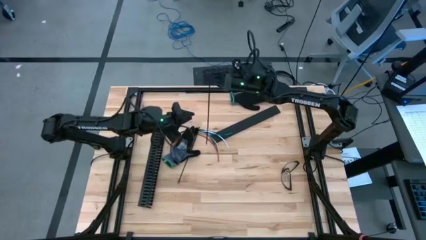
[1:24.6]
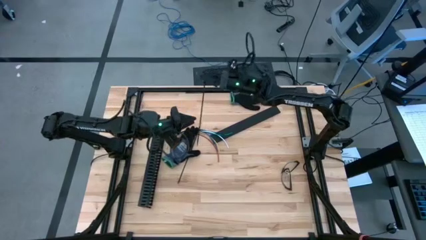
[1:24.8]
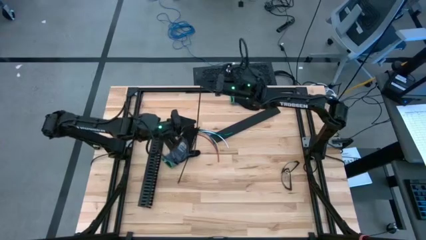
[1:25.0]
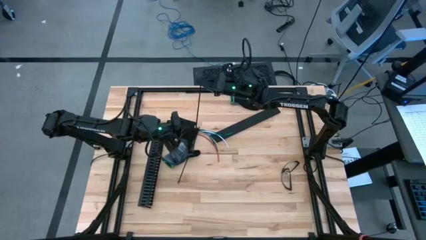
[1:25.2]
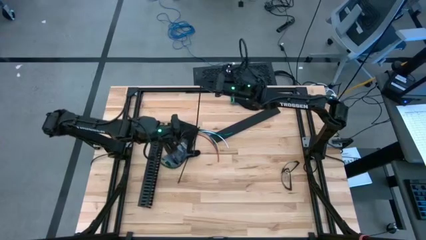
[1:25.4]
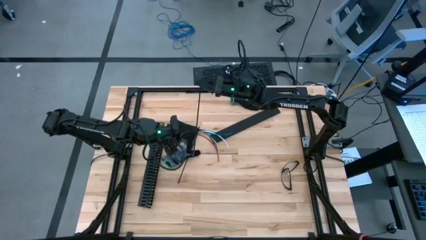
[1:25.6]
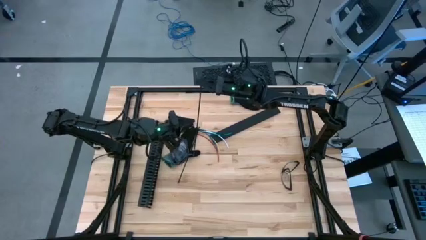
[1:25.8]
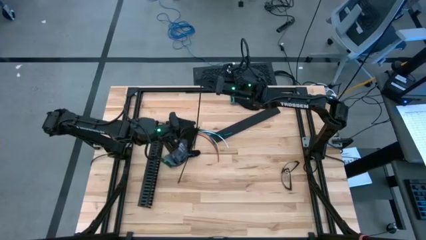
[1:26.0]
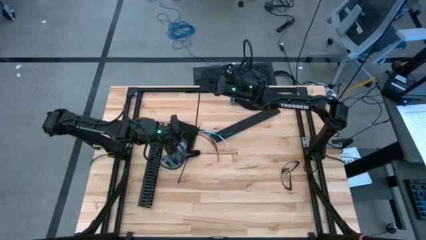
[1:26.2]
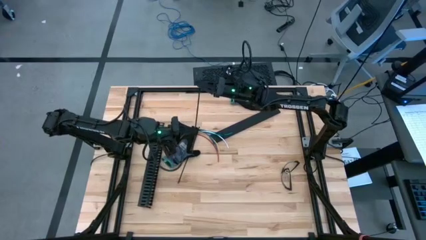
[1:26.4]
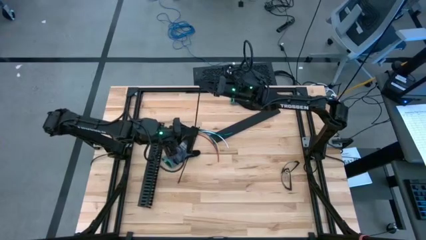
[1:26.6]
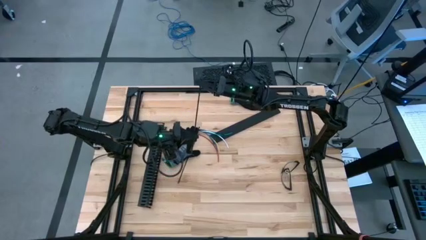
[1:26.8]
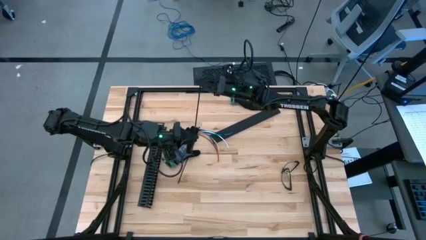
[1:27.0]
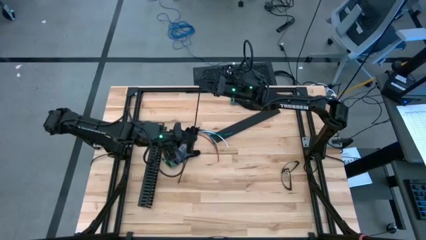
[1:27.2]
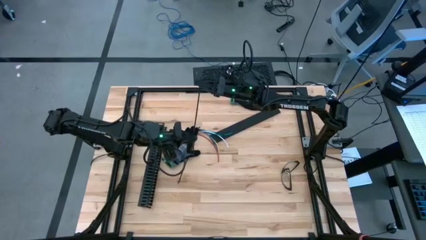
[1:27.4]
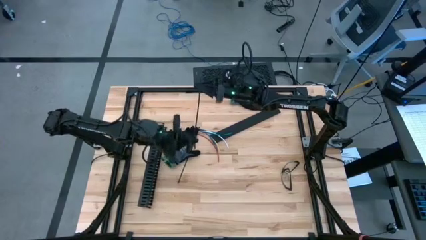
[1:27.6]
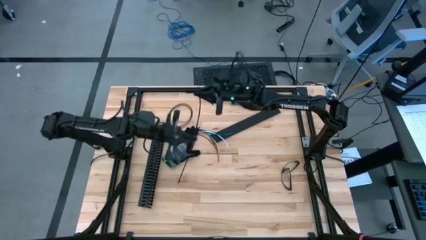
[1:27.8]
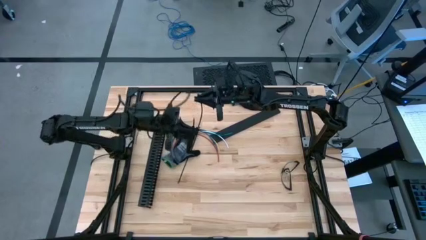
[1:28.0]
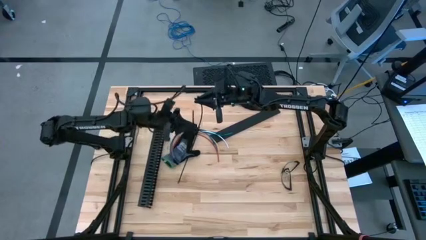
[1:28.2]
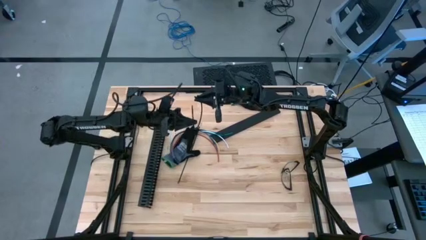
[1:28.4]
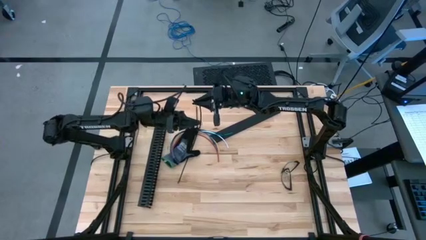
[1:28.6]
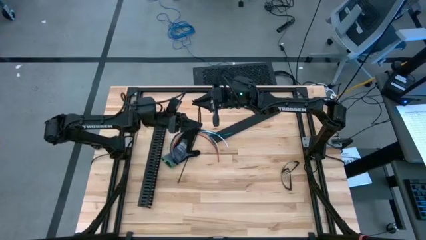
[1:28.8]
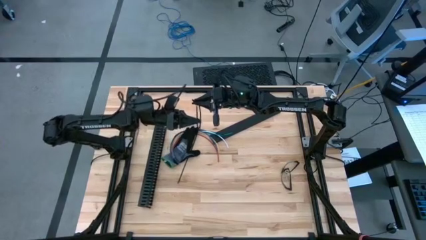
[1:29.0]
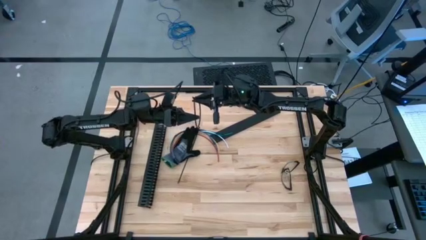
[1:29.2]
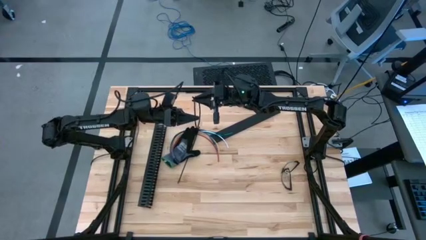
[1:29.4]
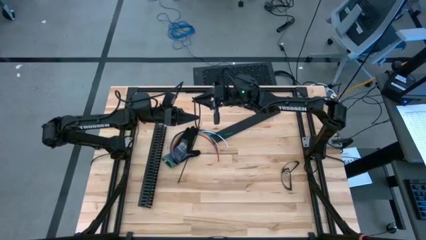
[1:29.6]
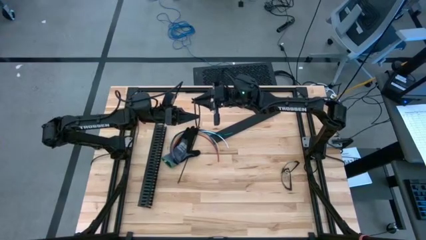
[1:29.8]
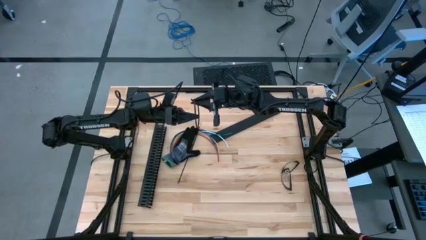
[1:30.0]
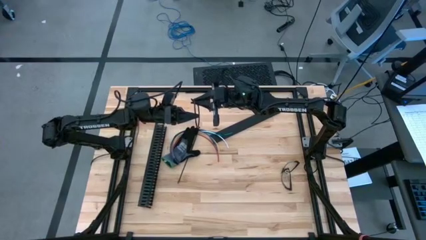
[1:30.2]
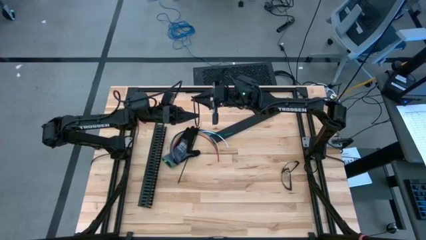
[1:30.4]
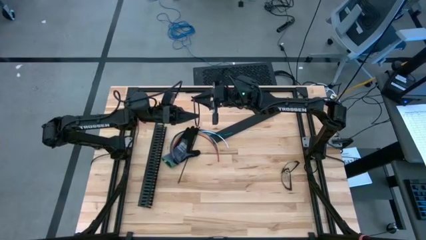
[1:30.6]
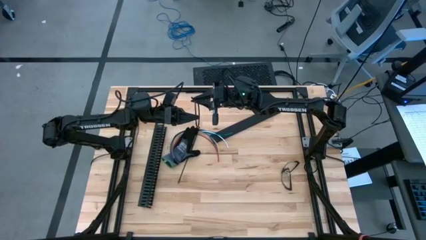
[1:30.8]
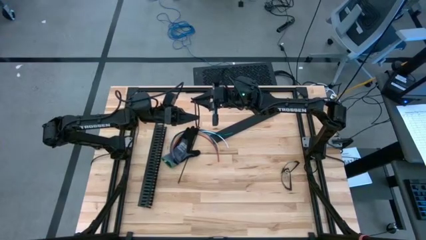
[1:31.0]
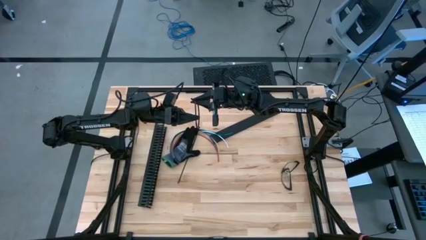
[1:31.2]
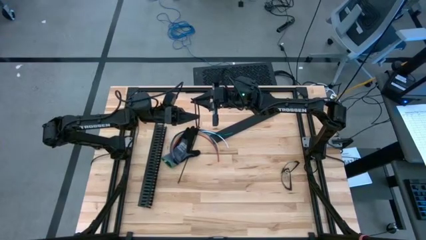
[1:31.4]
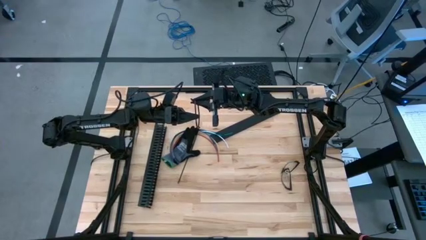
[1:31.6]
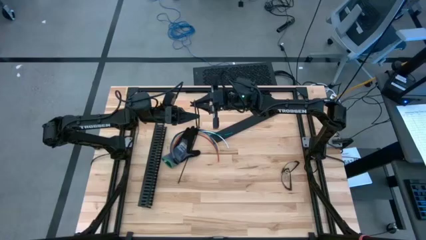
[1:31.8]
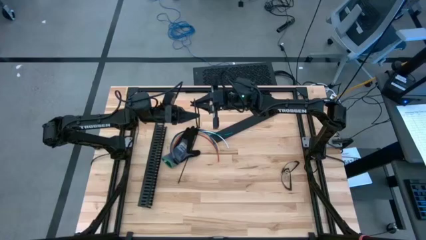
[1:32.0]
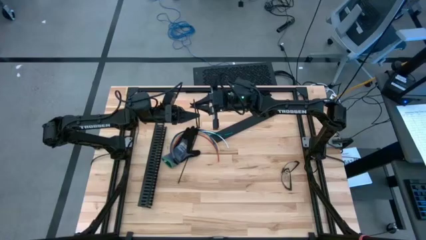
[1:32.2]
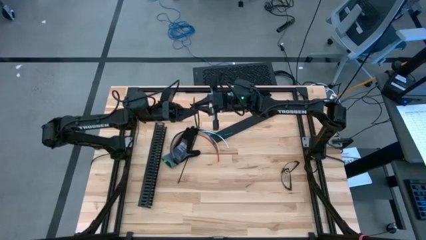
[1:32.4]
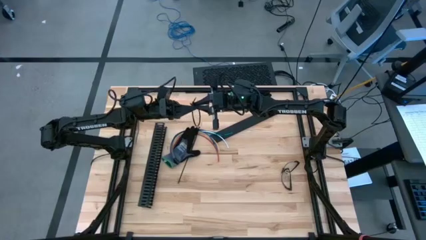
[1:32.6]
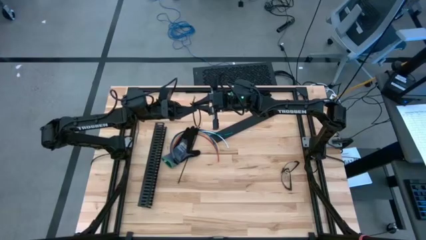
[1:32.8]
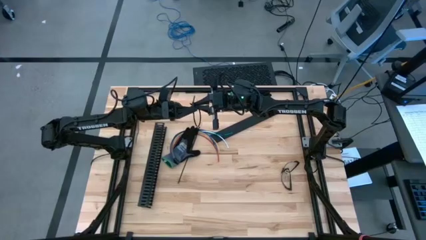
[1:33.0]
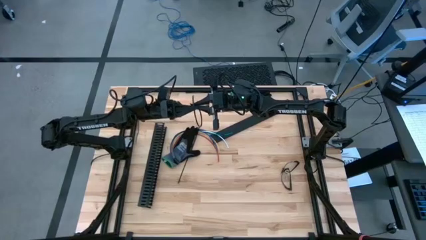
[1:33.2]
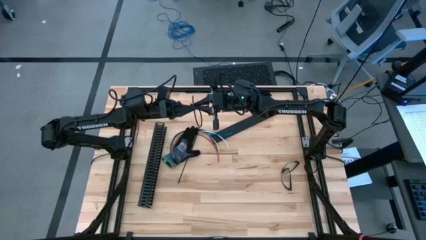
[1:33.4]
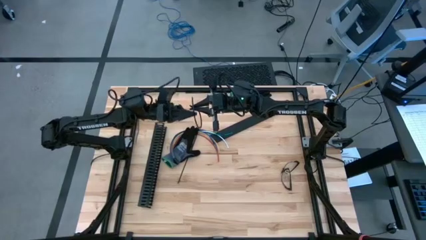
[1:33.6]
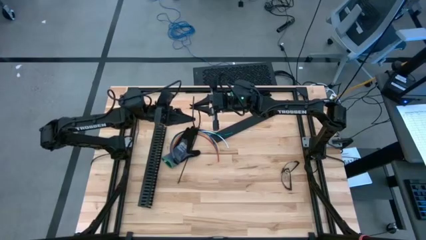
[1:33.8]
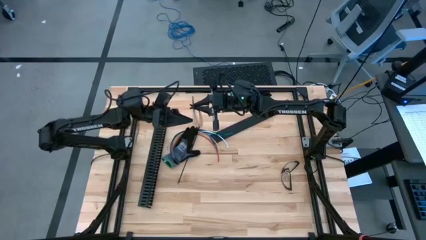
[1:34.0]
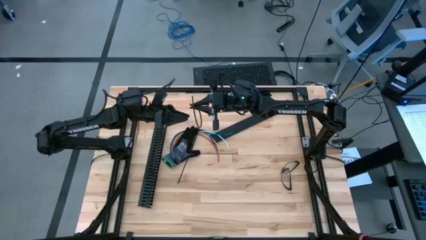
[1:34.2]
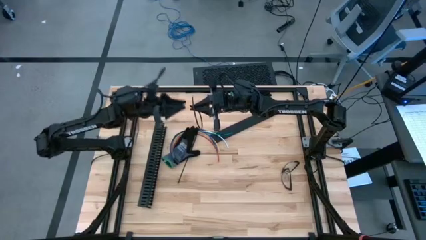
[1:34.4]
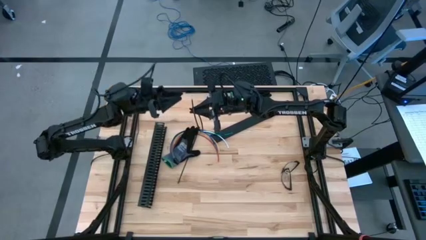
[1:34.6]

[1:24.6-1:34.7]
Task: Ziptie cables
Wrap the cable wires with the black zip tie
